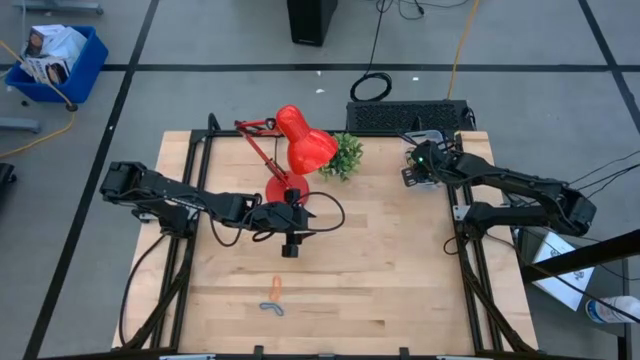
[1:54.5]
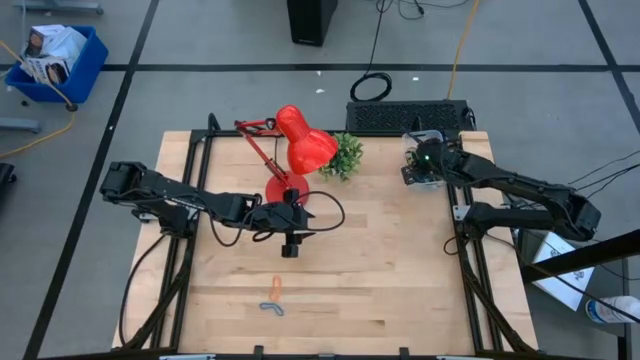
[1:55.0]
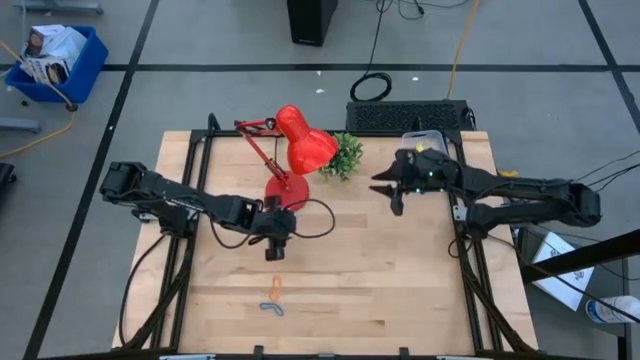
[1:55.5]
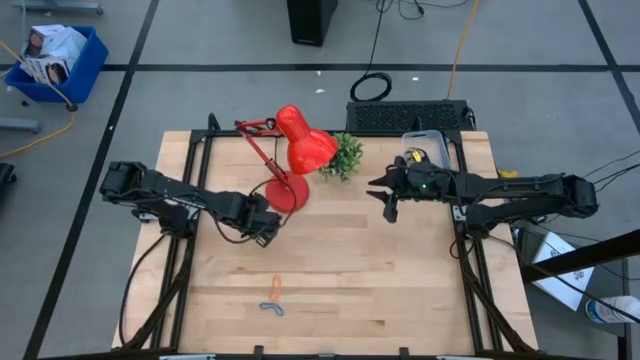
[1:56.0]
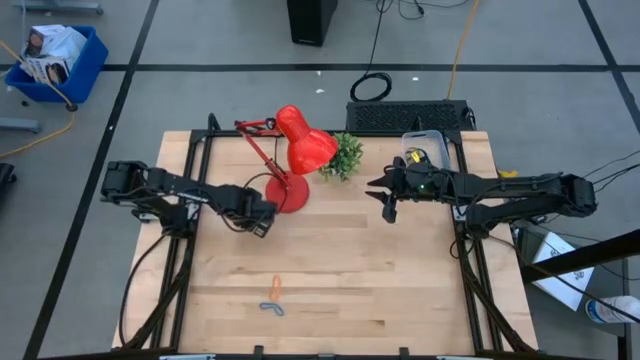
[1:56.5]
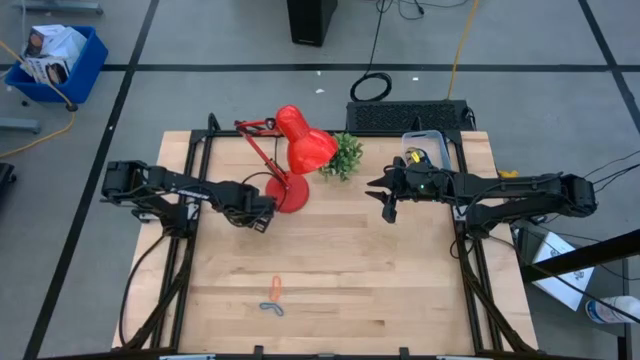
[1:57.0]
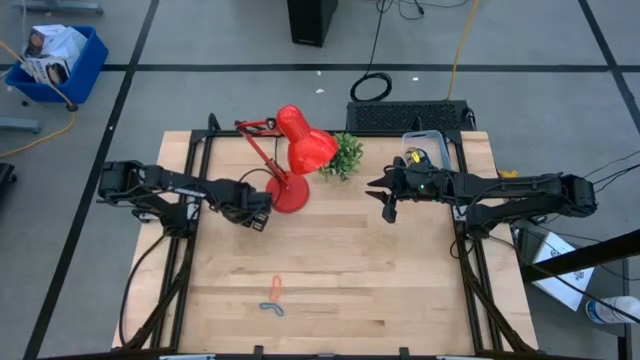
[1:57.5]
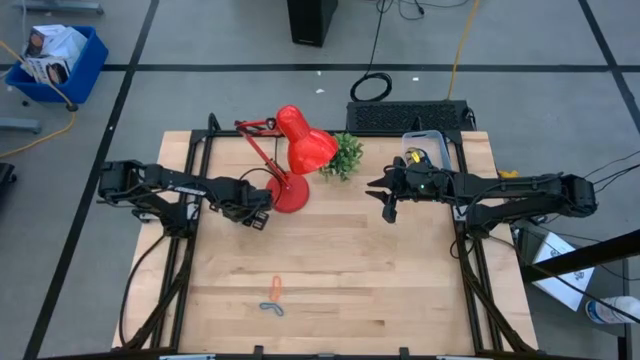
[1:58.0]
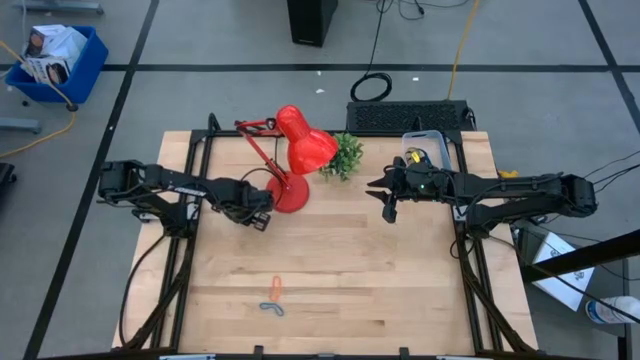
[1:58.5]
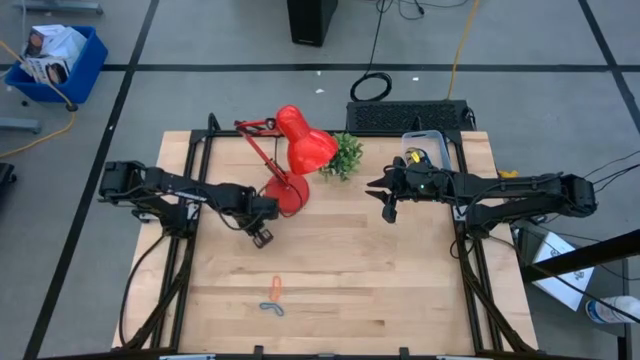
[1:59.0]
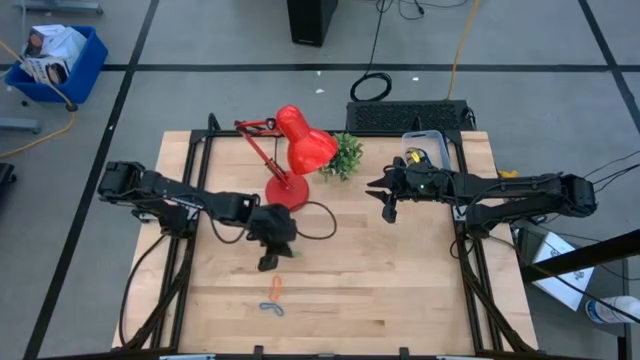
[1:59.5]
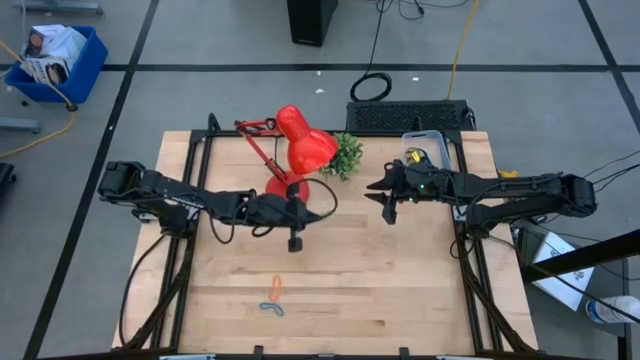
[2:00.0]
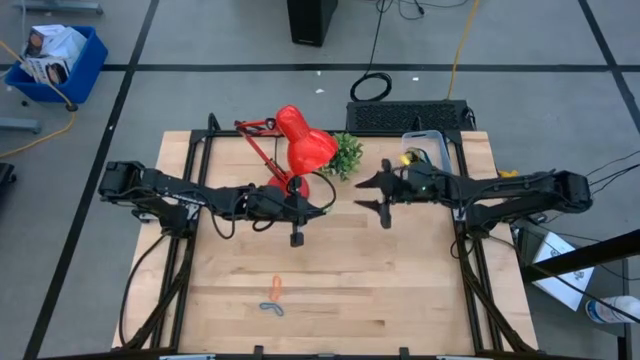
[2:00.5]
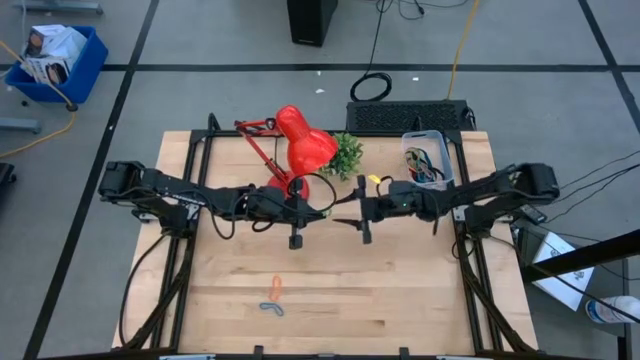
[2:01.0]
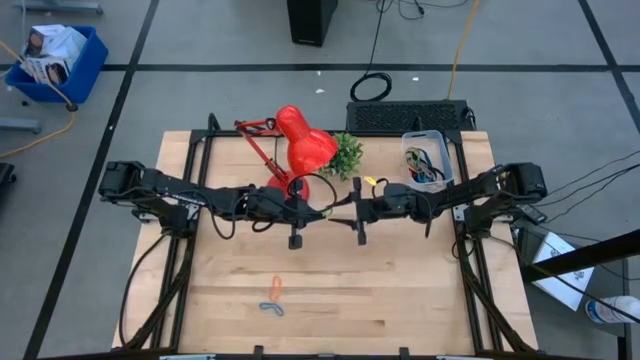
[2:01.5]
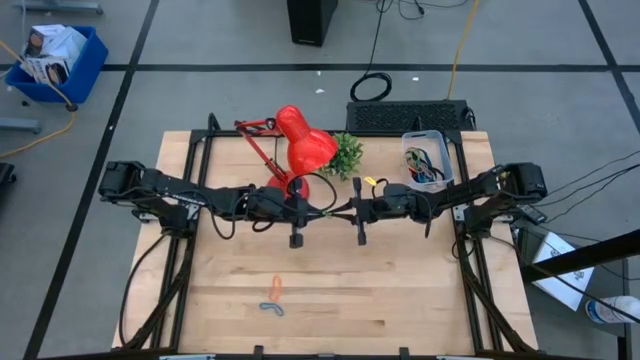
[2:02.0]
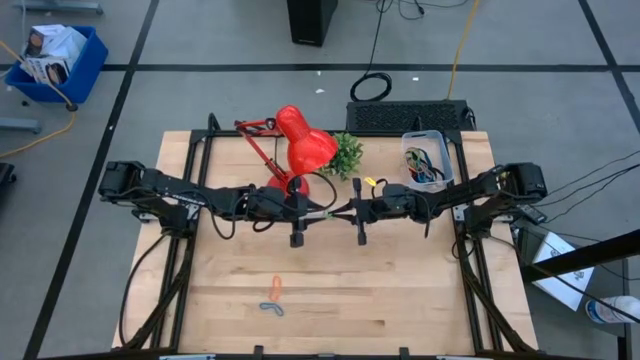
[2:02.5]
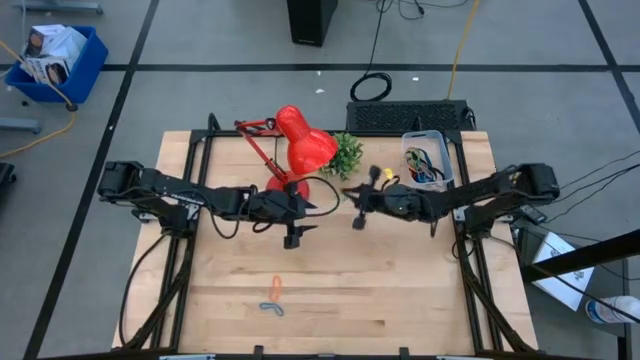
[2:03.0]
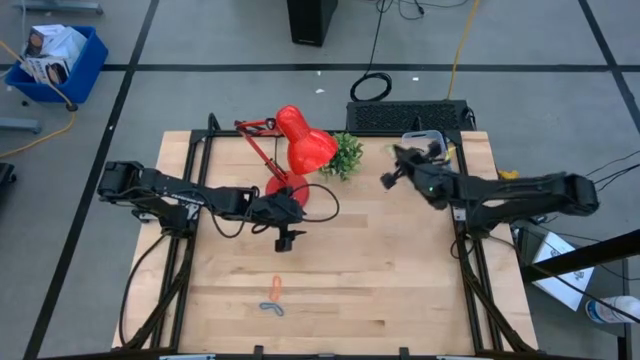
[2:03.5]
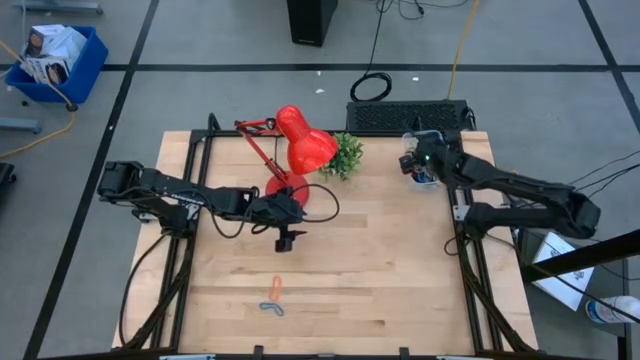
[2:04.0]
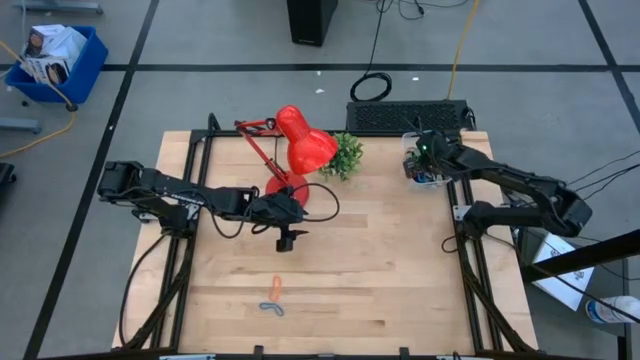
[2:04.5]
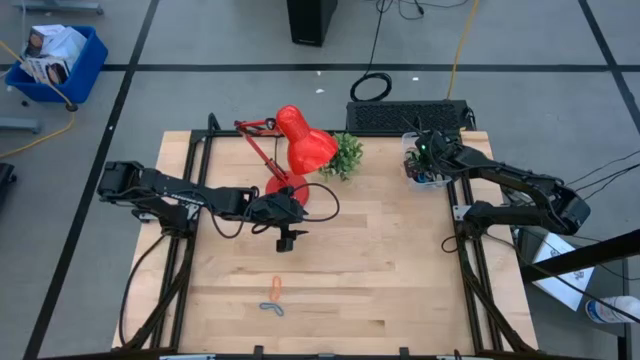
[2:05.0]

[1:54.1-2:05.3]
Task: Pick and place rubber bands into bin
Put the green rubber band into the transparent bin

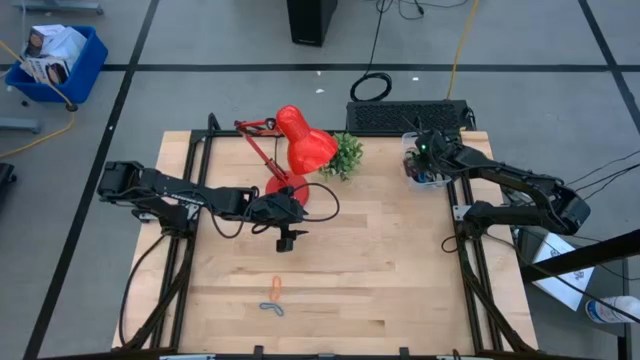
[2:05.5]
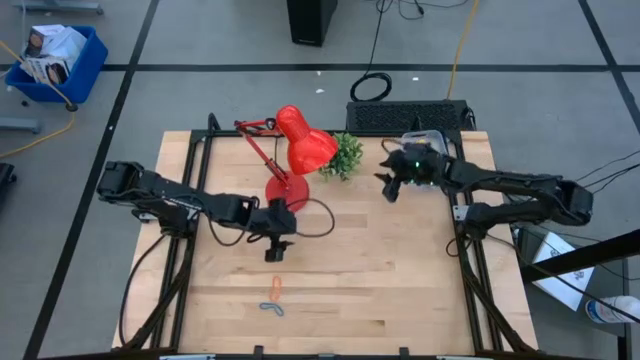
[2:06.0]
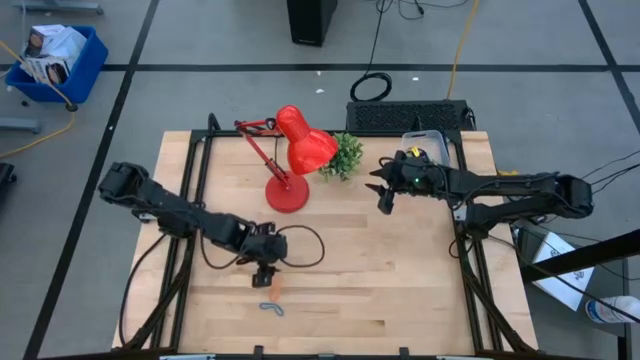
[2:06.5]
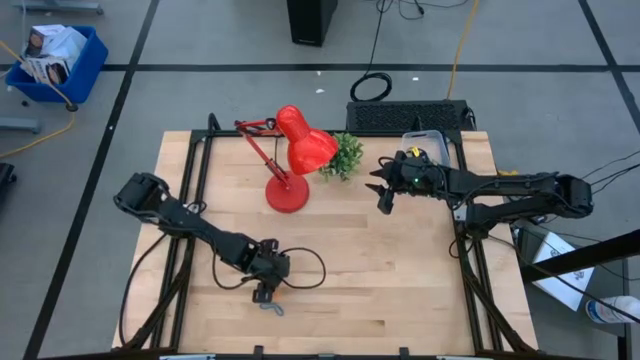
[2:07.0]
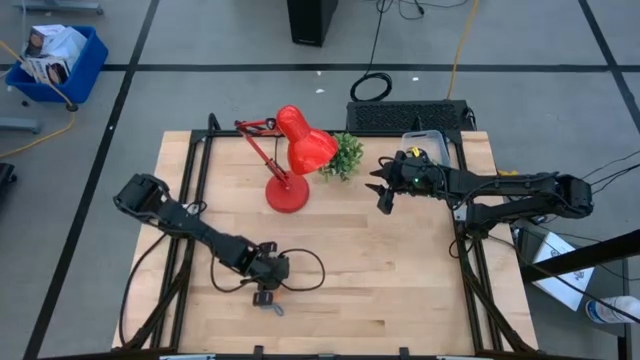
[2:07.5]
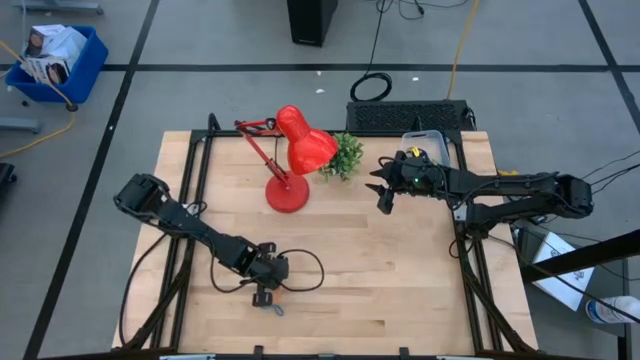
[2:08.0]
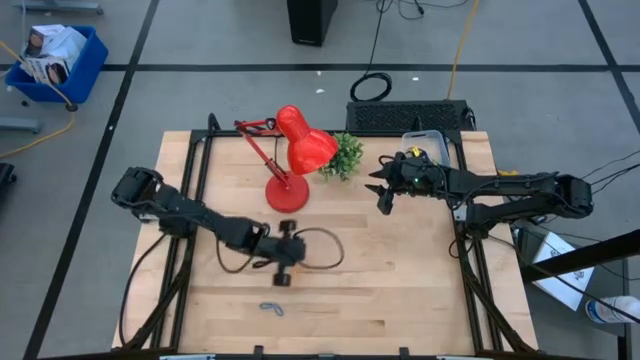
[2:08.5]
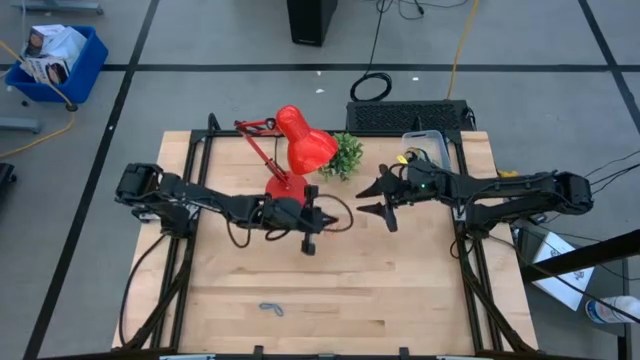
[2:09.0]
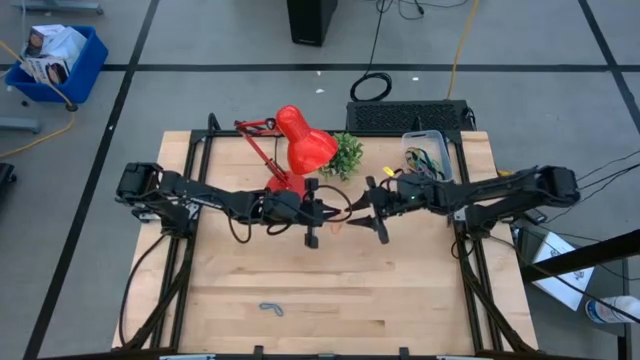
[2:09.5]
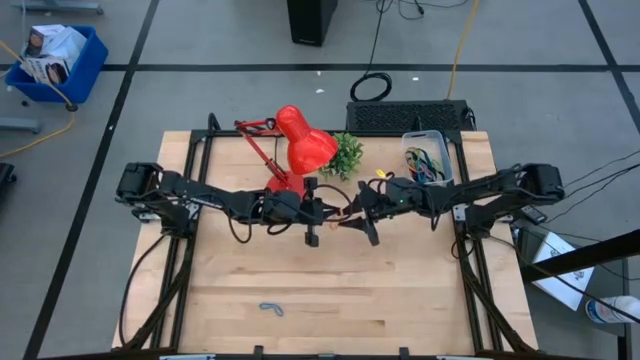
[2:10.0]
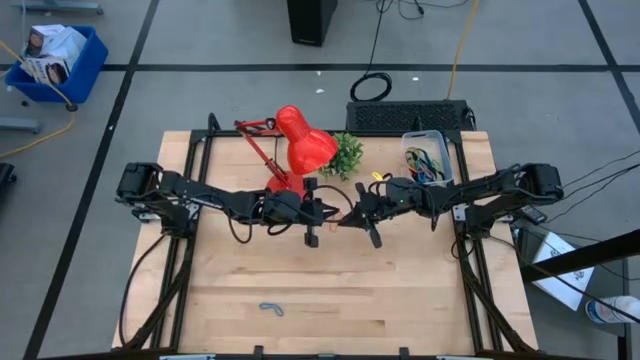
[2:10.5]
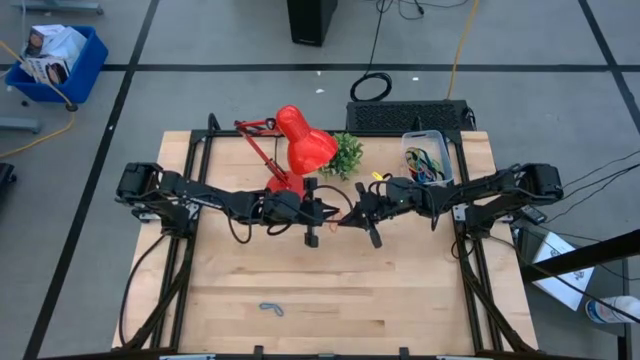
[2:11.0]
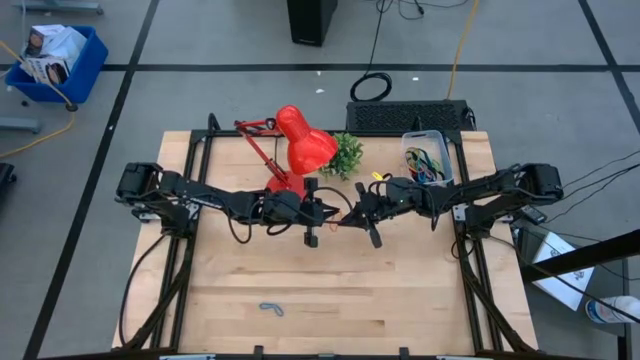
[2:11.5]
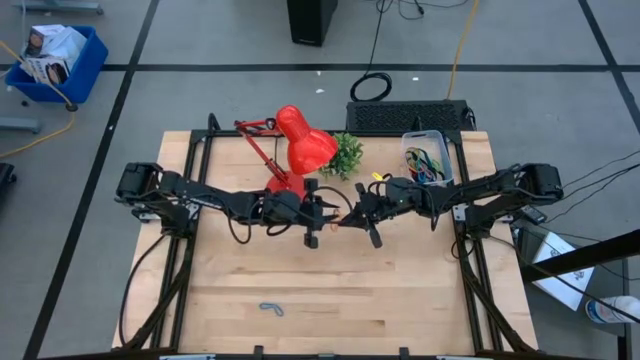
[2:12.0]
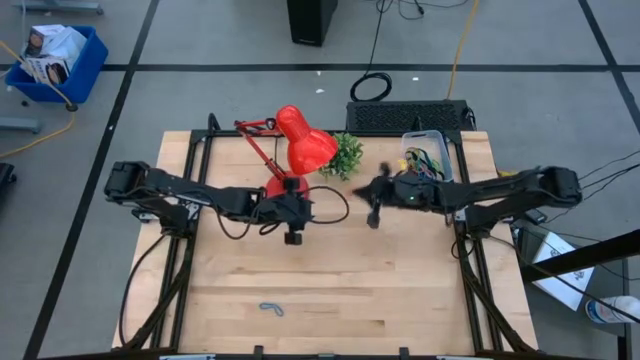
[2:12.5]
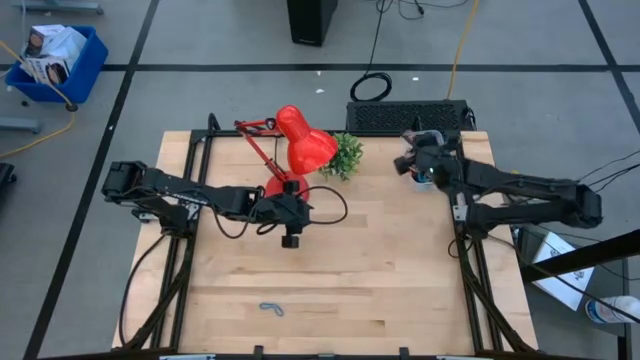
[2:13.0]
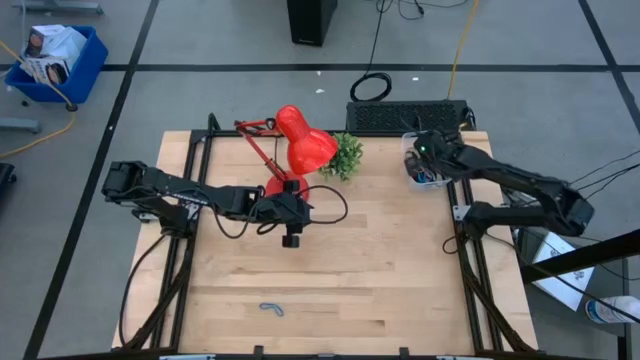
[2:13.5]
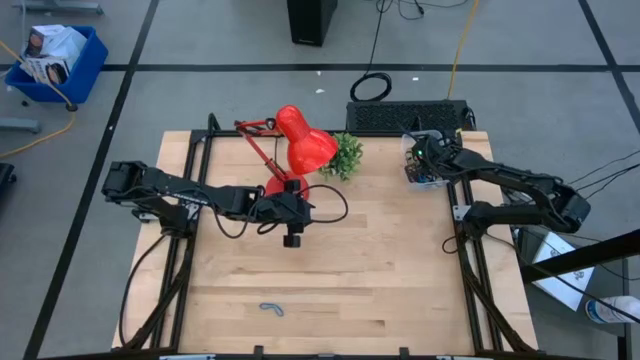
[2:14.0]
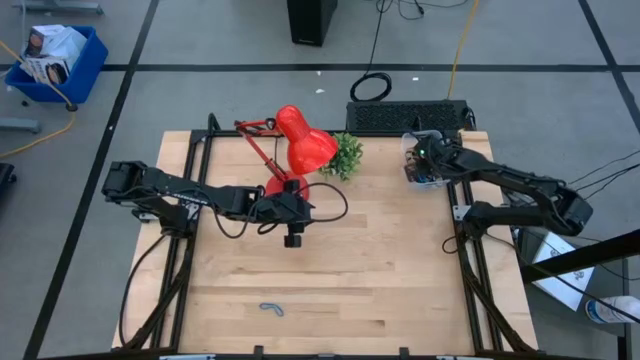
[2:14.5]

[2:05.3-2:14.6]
Put the orange rubber band into the transparent bin

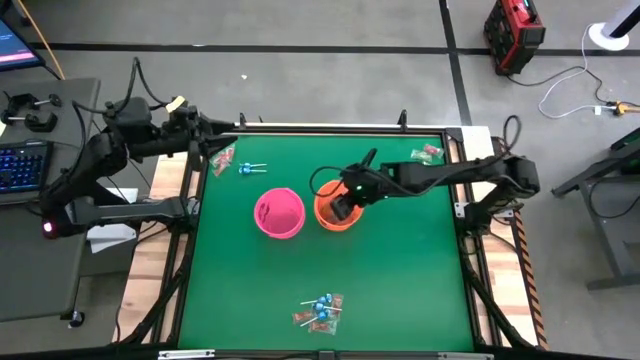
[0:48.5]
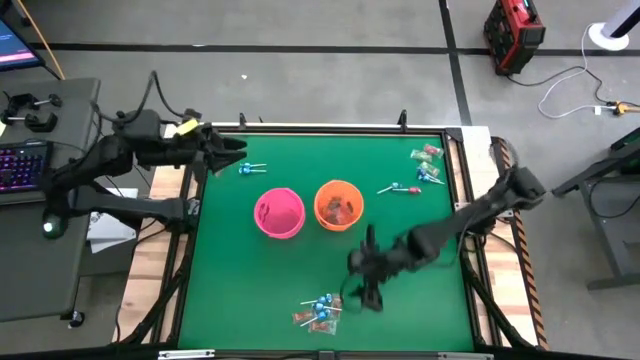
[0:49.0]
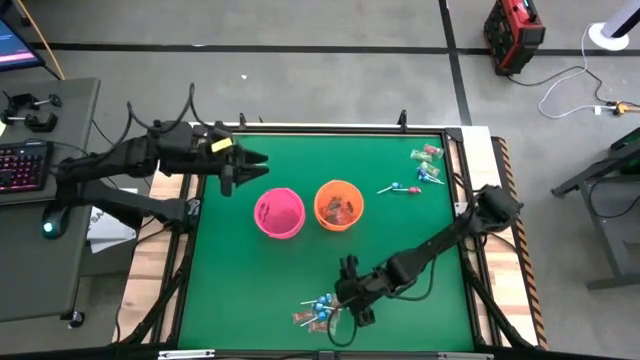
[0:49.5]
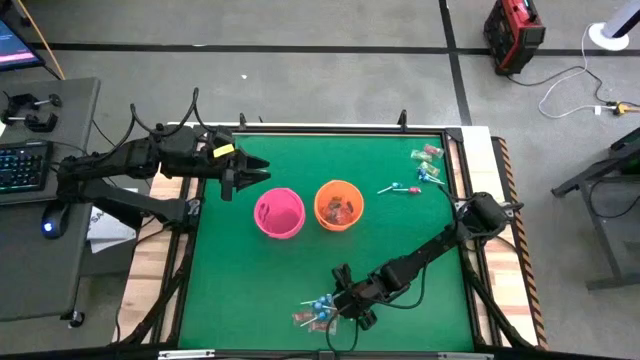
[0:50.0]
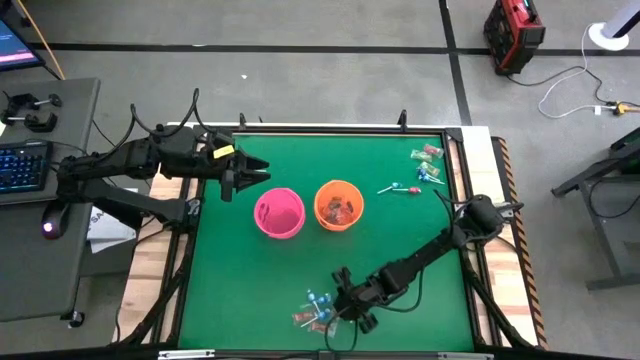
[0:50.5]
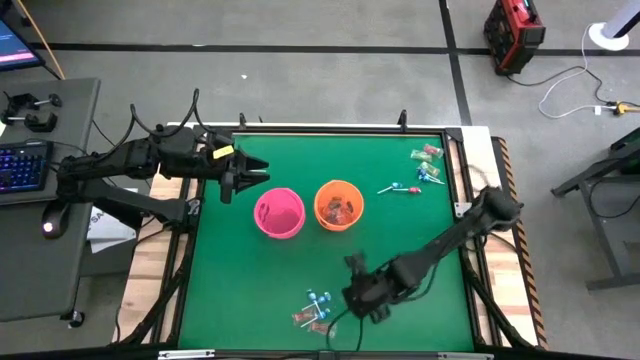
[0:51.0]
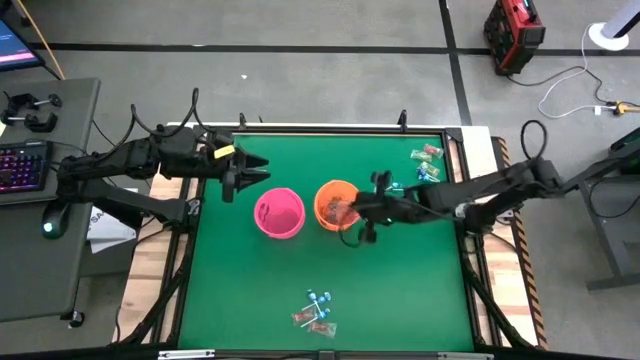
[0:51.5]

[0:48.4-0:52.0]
Task: Sort candy by brand, put in halloween buckets
Put the orange gummy into the orange bucket
